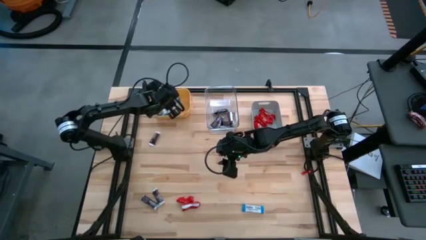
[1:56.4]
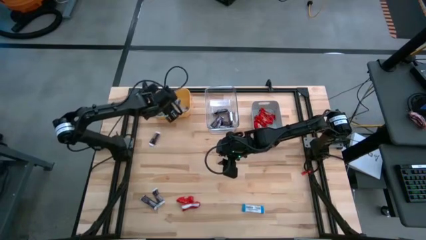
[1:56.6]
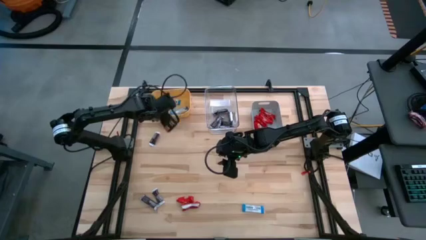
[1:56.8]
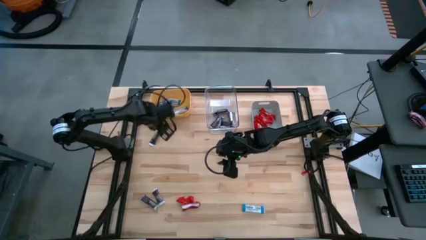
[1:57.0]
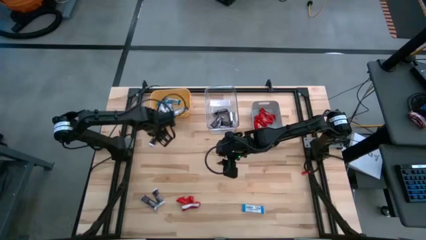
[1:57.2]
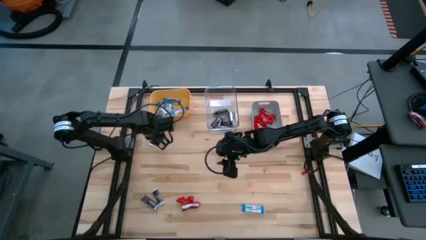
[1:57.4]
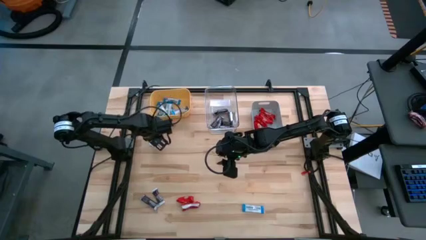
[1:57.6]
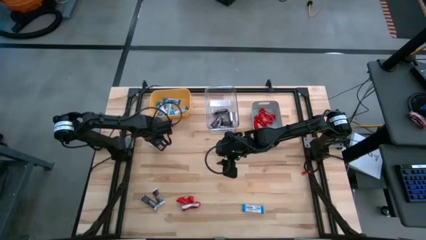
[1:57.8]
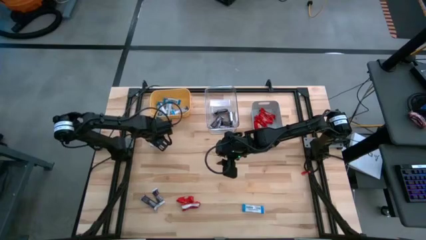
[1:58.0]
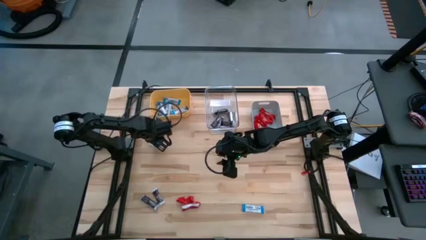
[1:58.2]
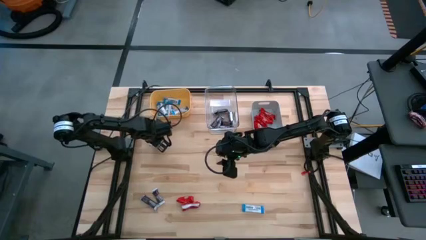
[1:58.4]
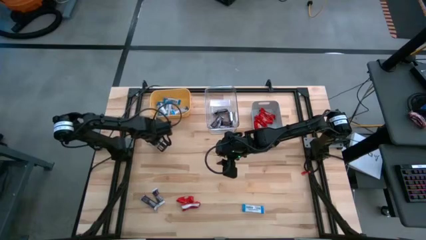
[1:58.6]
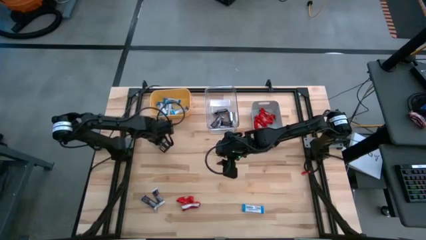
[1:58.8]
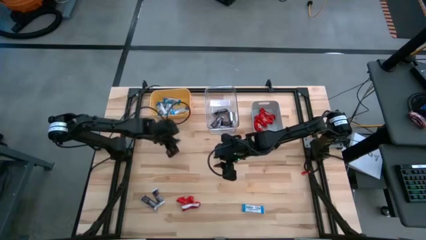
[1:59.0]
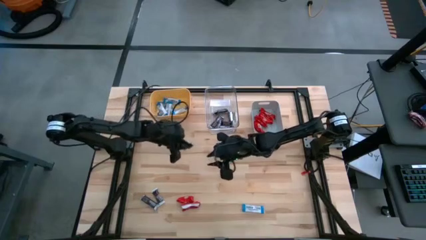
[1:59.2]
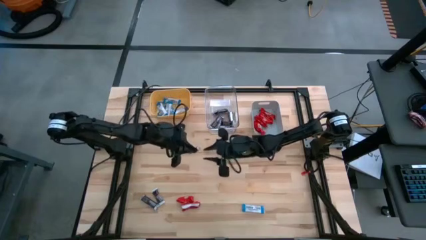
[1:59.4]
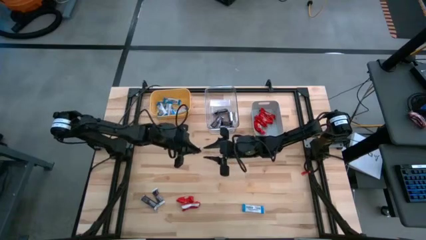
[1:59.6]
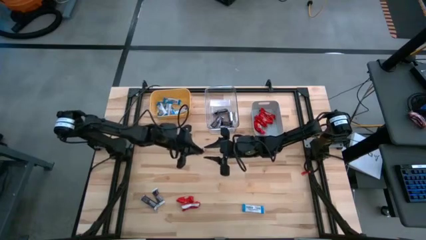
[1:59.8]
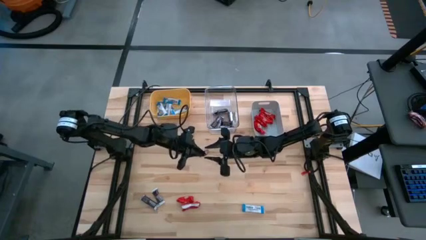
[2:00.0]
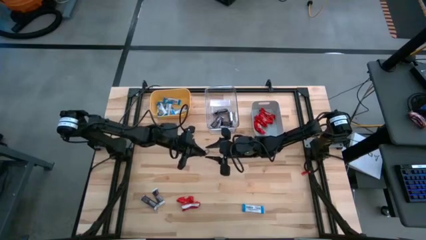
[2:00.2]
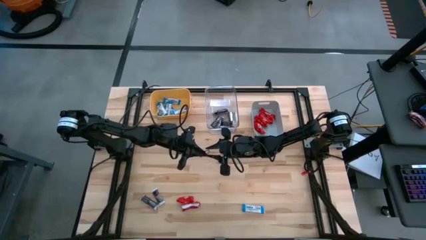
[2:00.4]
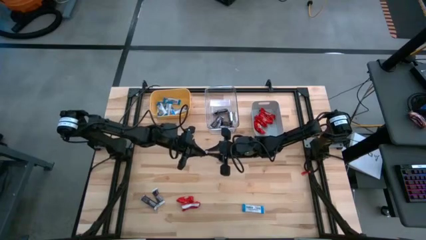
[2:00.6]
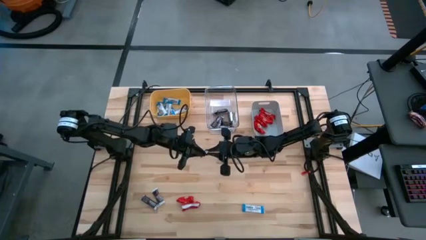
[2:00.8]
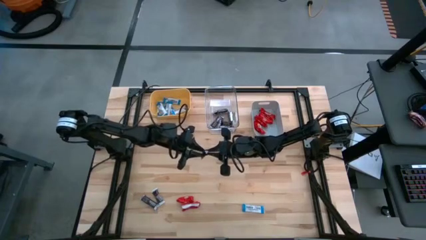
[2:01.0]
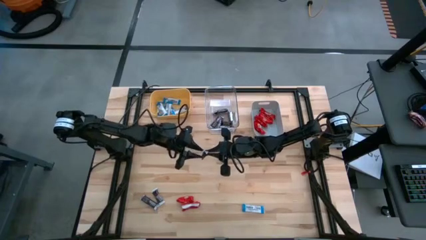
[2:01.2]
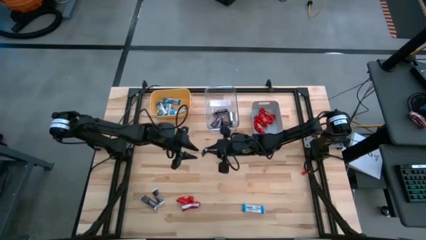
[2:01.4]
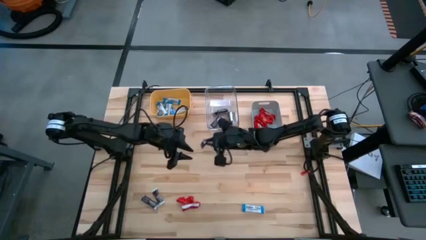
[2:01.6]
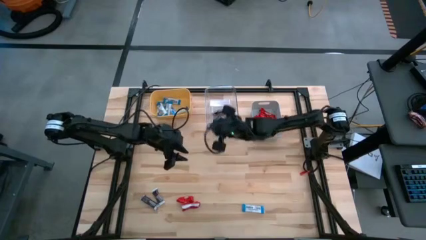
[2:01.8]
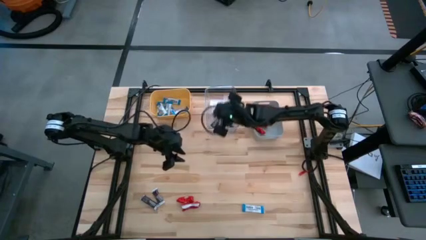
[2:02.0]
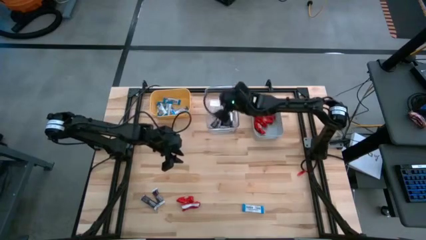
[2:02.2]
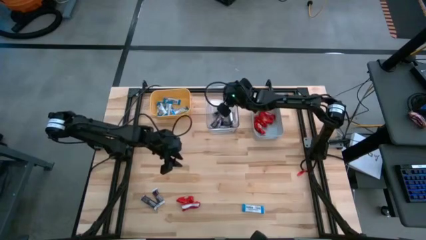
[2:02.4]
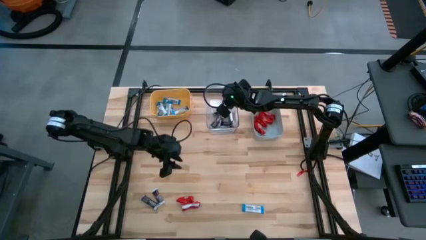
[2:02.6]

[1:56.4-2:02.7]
Task: Sort candy
Put the brown chocolate into the transparent bin

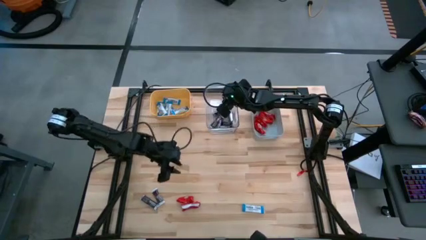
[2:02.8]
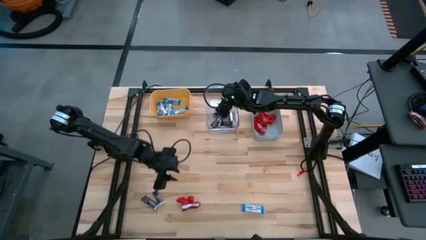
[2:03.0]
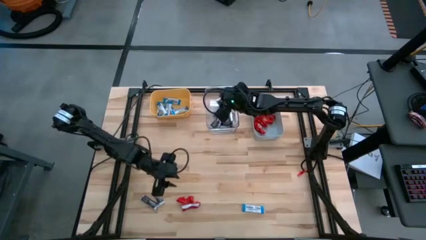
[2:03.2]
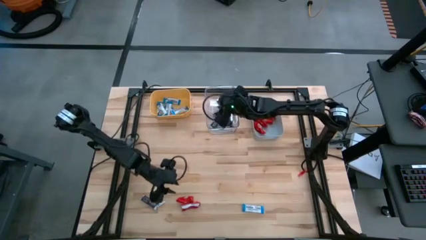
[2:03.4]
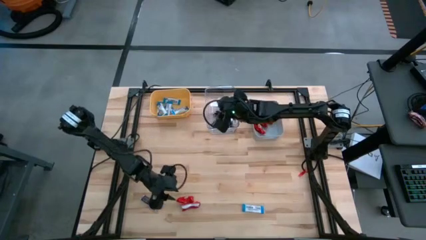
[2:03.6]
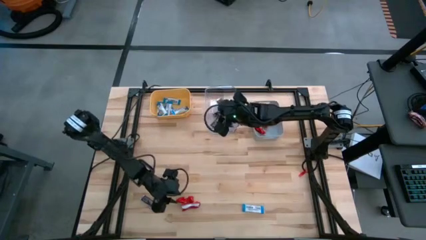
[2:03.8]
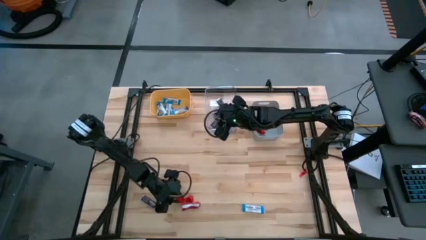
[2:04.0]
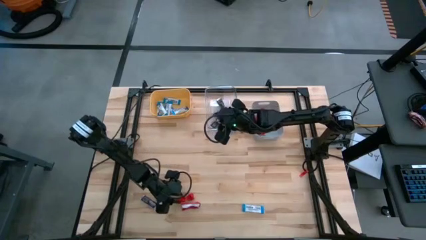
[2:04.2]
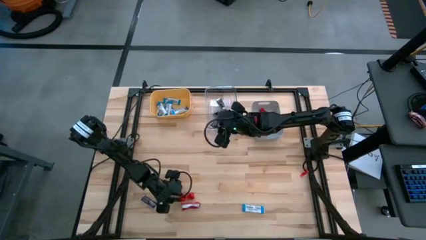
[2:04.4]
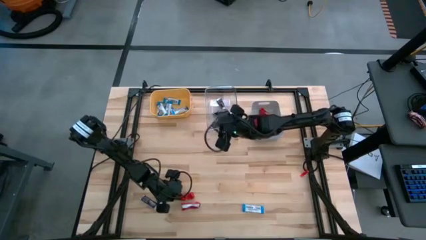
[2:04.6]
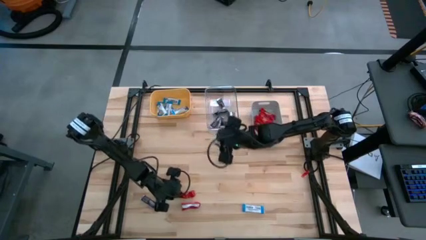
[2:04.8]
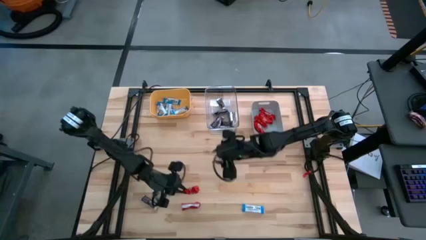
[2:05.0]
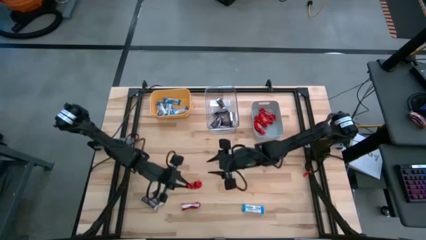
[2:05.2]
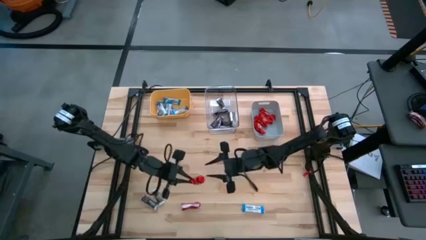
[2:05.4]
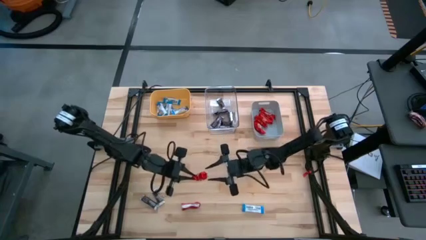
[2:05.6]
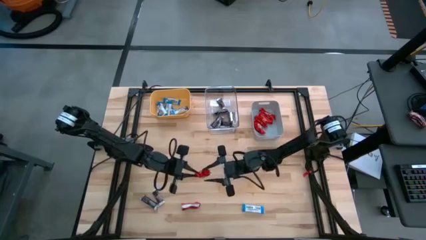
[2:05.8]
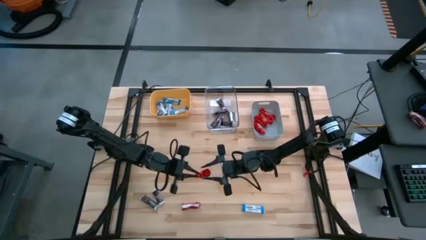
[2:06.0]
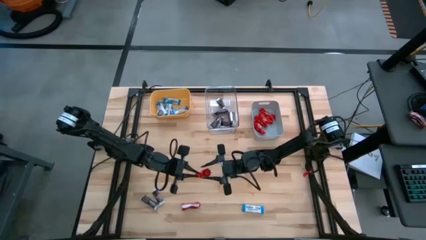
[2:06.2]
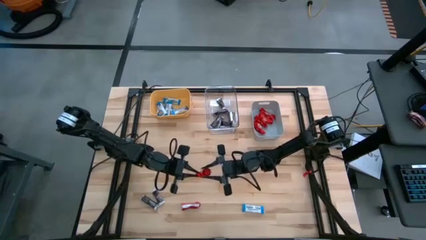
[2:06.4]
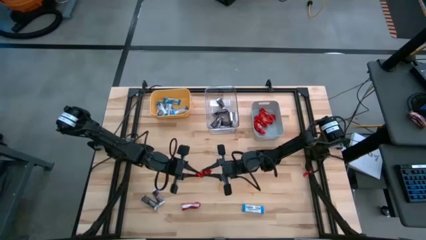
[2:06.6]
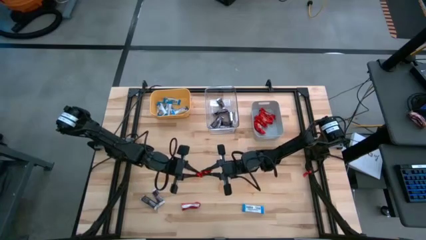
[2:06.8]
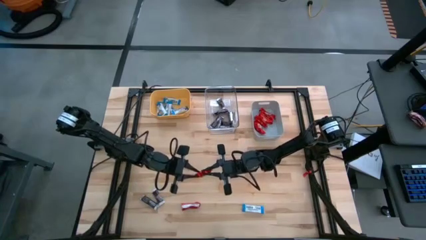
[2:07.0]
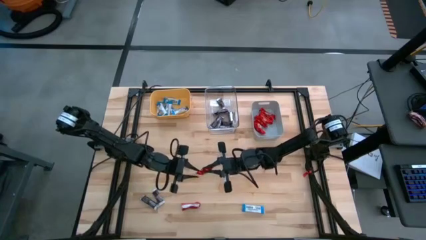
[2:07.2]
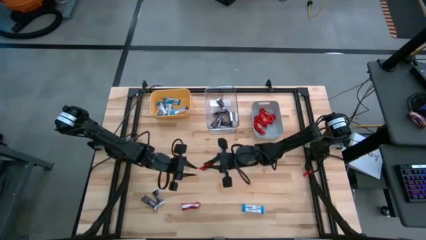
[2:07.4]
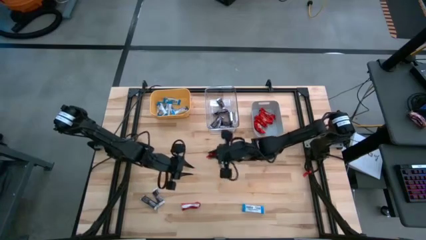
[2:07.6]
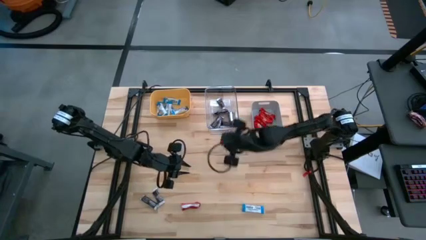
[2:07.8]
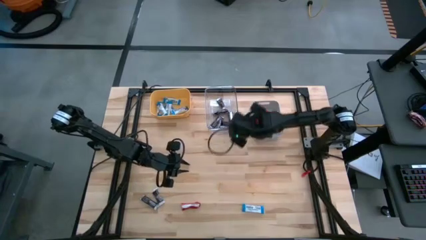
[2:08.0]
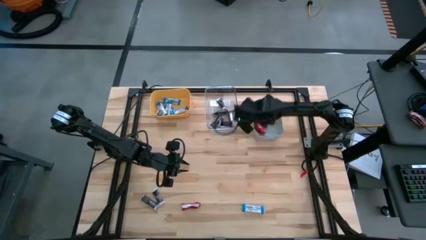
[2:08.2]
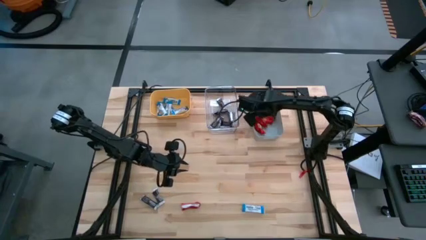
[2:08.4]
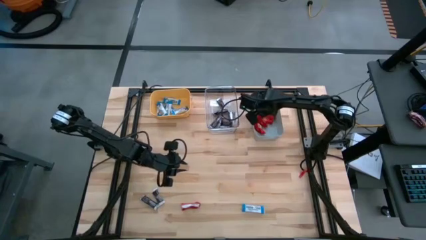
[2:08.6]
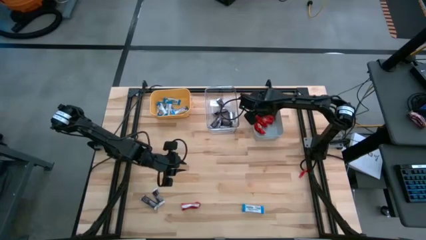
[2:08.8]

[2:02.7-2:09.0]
Put the red chocolate into the gray bin

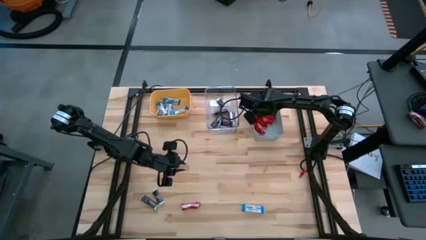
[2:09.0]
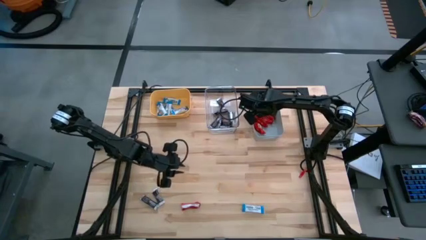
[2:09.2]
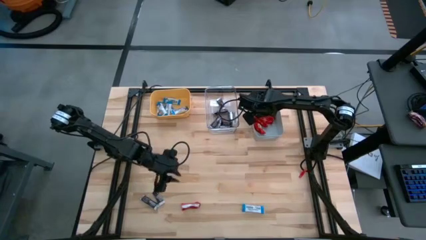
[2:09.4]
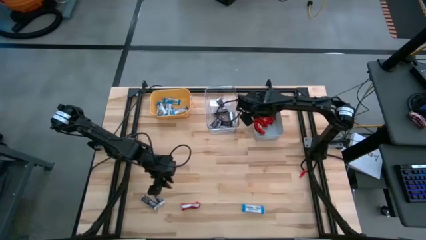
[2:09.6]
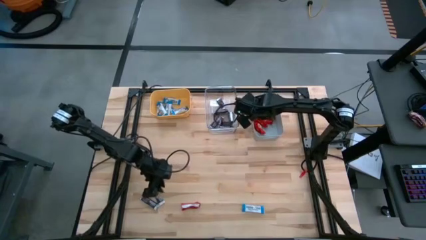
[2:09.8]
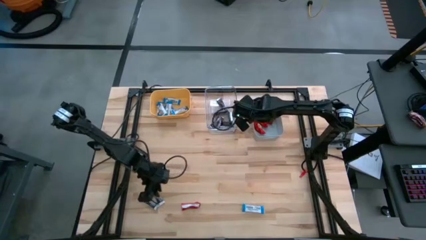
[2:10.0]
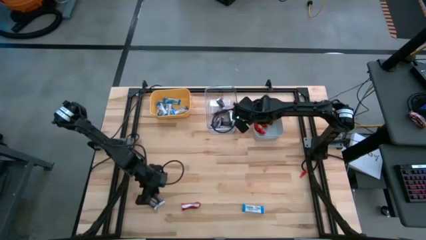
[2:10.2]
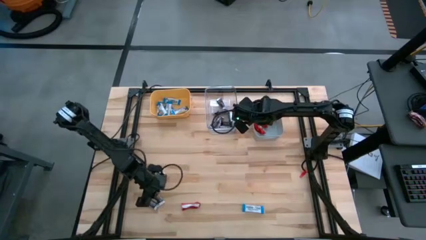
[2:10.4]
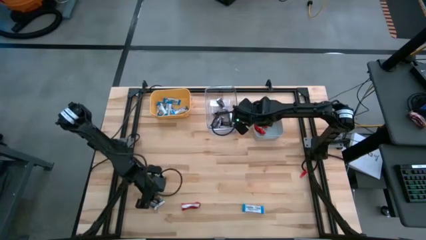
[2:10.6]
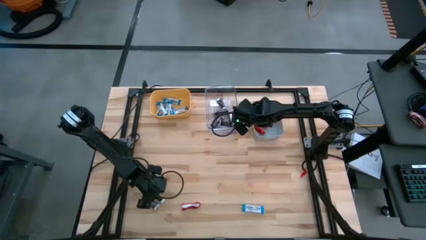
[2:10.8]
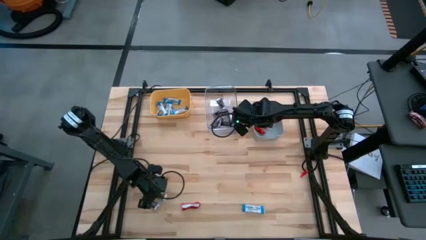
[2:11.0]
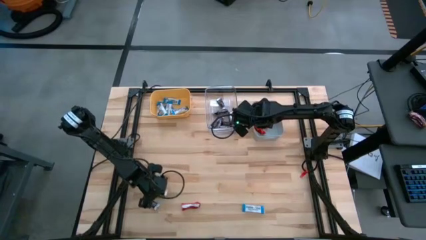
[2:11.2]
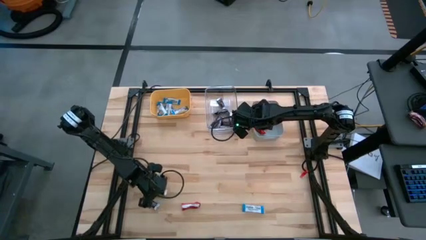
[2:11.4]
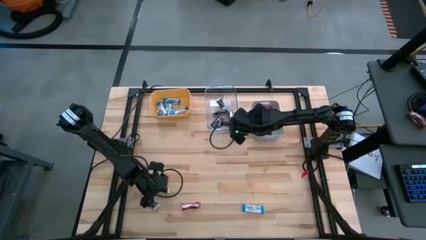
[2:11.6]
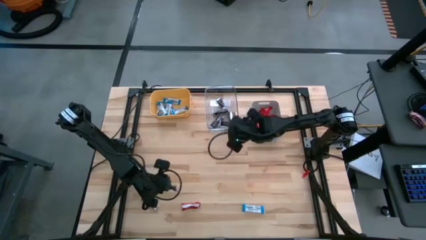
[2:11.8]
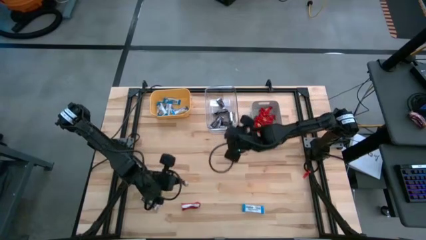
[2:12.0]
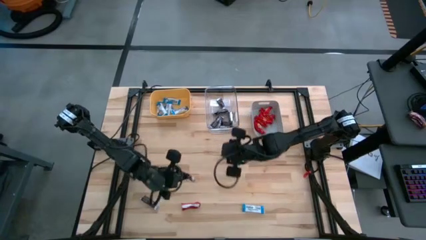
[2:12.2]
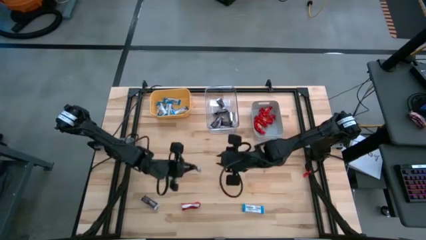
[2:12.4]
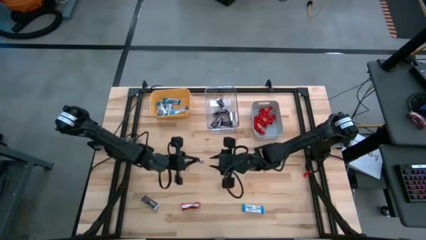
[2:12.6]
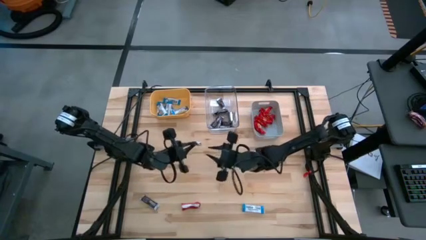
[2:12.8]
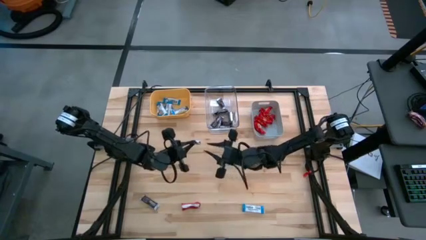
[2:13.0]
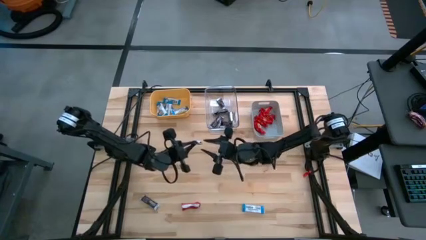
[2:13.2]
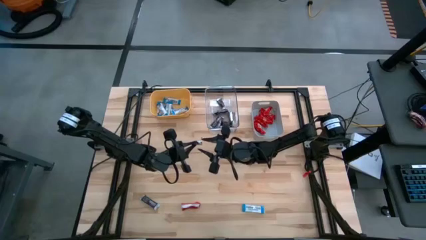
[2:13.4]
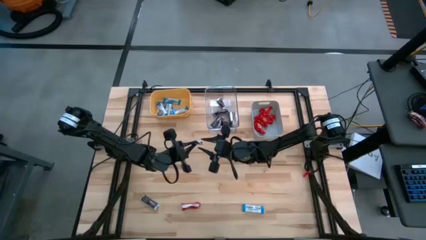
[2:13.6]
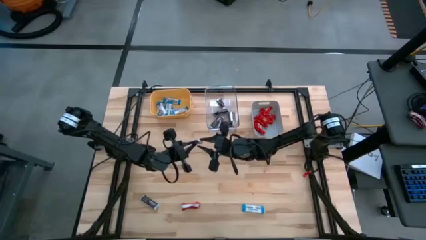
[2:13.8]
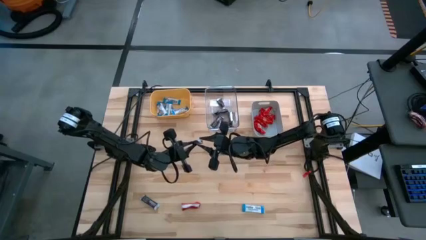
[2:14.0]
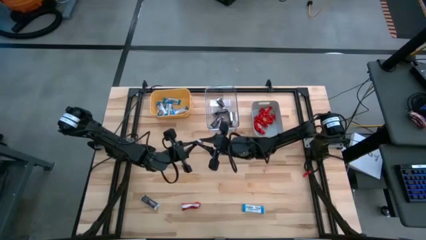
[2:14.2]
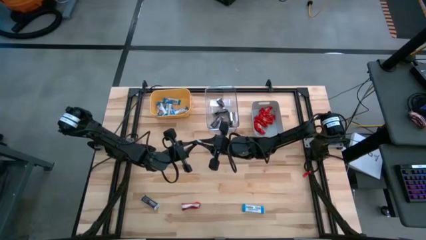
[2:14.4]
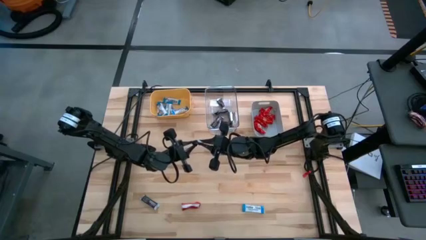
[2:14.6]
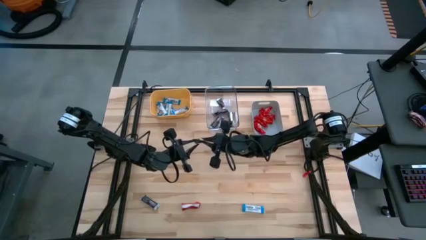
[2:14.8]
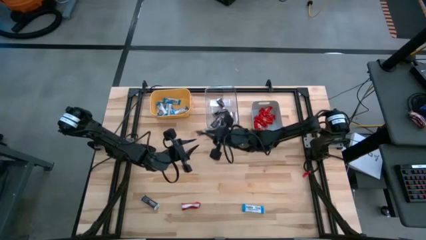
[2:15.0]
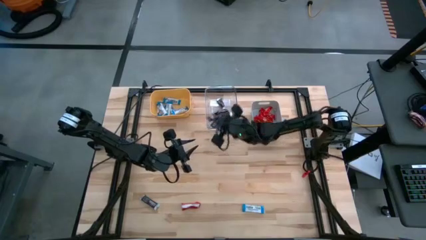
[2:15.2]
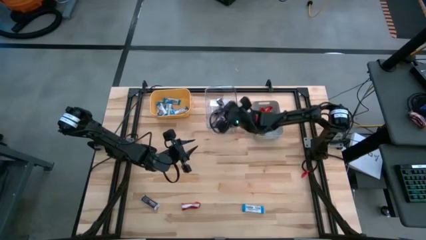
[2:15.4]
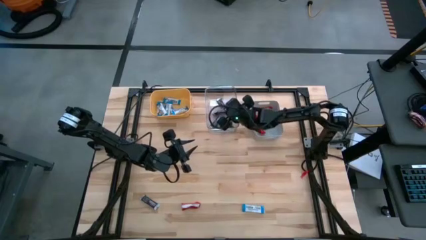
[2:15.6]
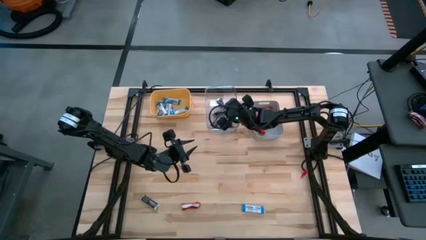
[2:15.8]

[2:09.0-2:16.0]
Put the brown chocolate in the transparent bin
